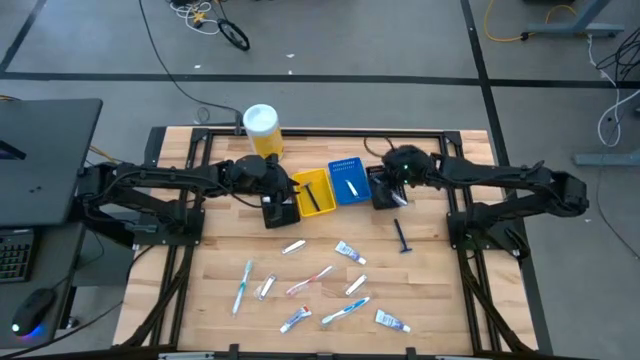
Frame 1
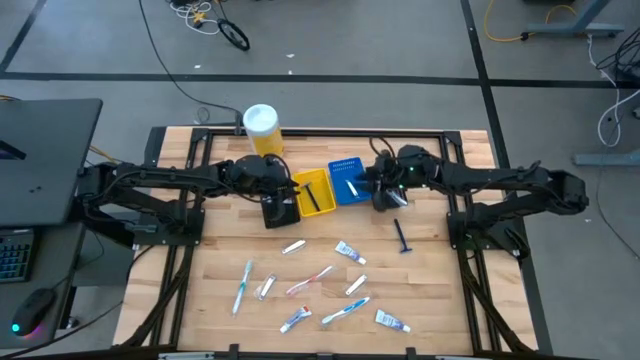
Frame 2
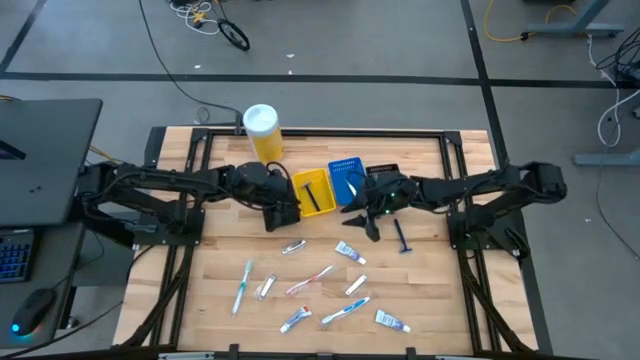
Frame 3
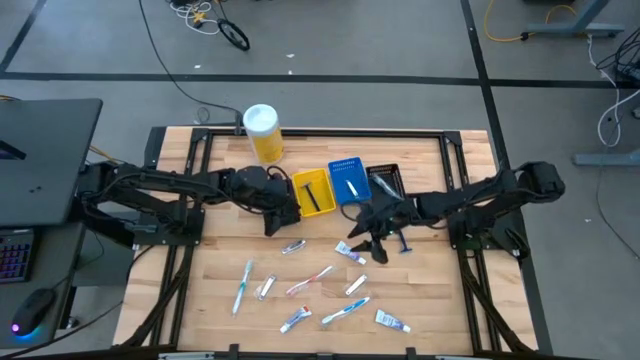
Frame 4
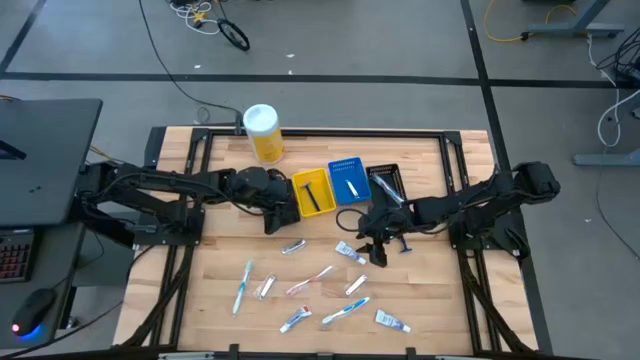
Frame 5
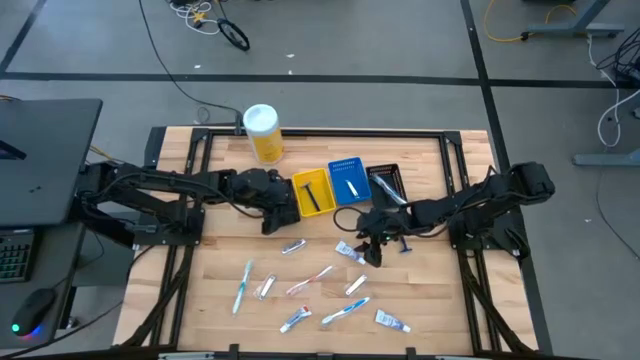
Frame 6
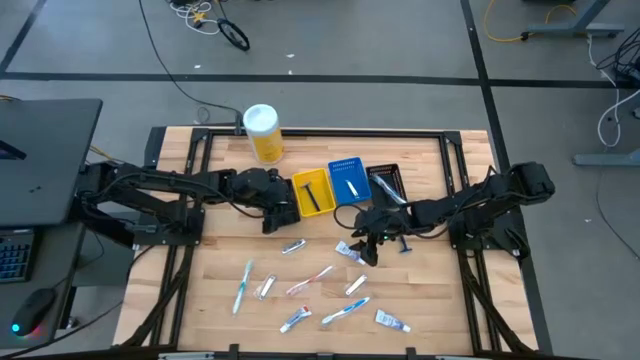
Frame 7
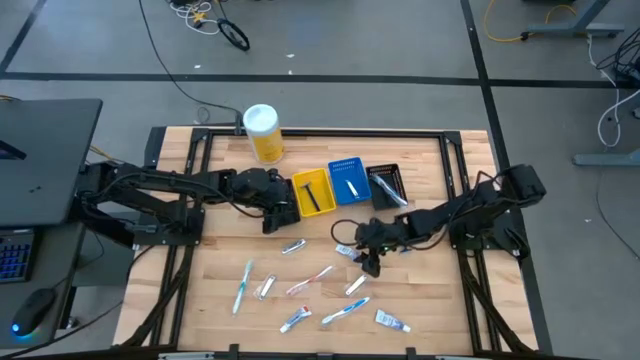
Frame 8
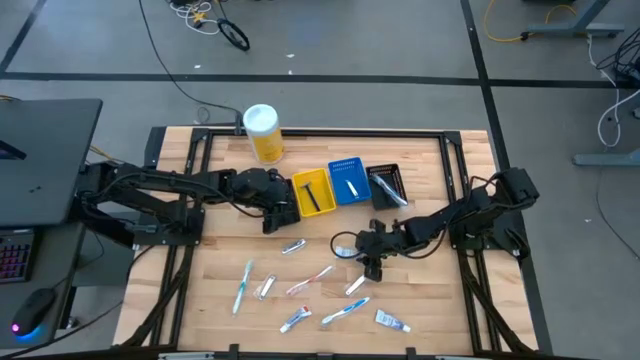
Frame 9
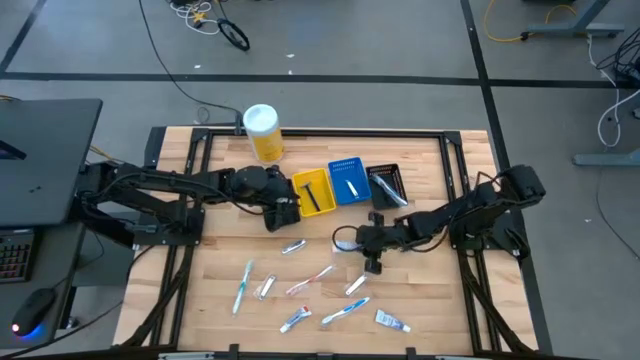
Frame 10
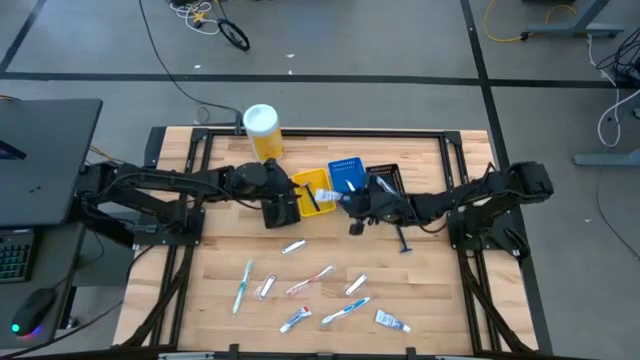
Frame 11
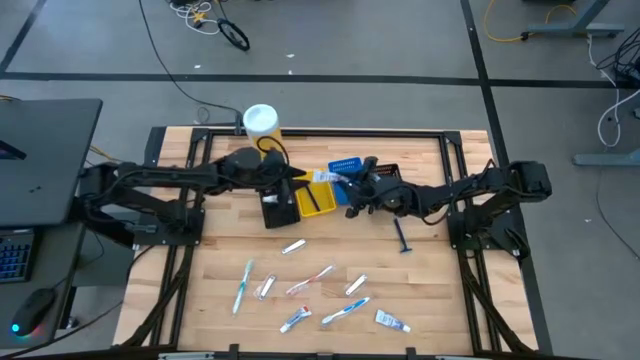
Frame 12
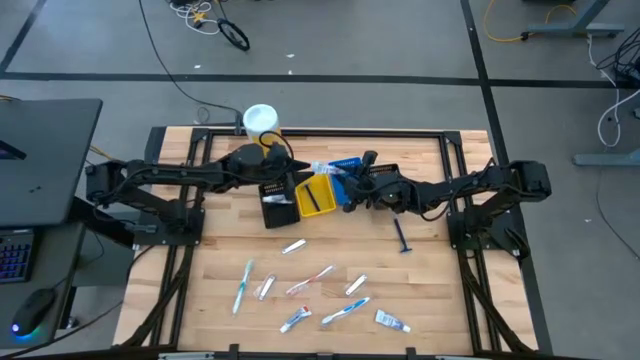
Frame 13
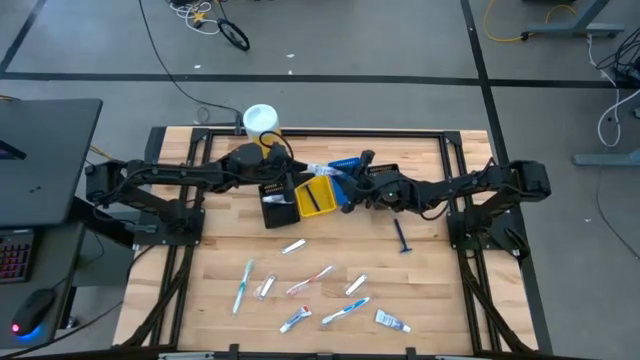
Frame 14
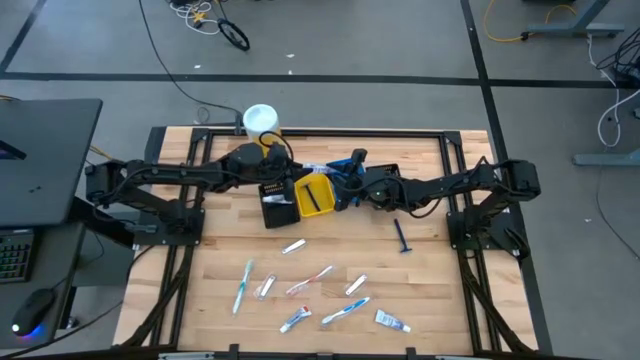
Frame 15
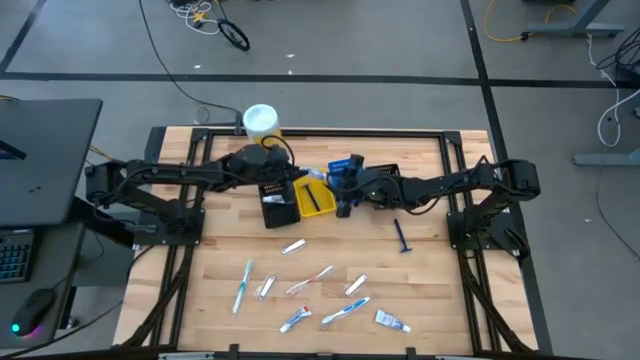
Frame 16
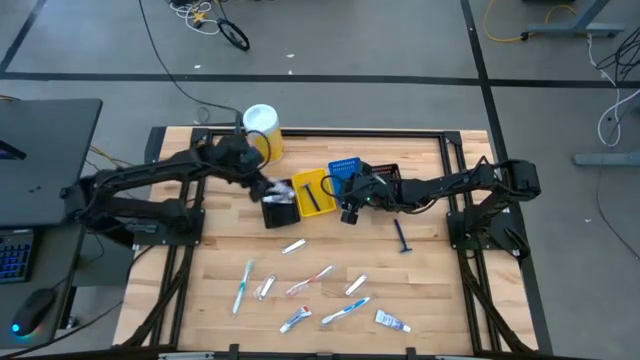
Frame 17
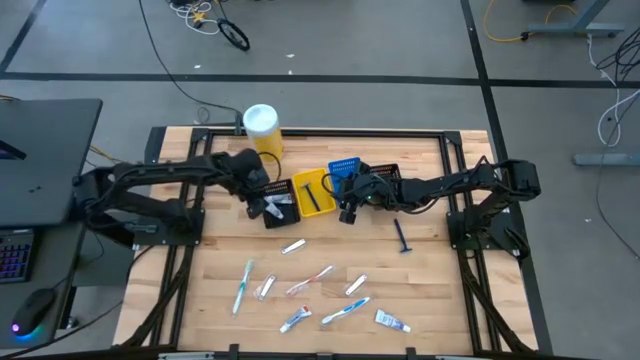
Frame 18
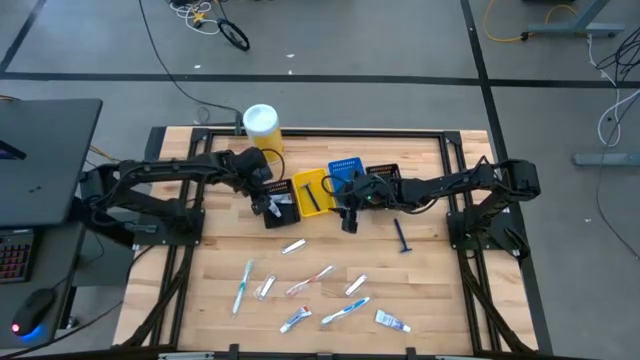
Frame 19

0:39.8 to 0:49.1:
Task: Pick & Place Travel size toiletries
Put the white toothpaste into the left black basket

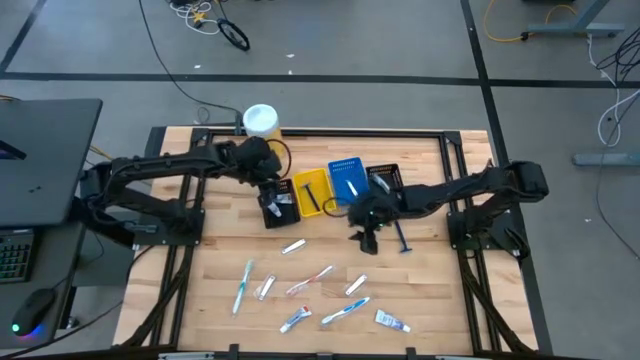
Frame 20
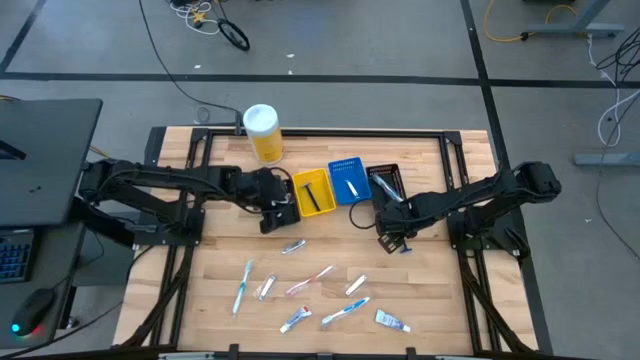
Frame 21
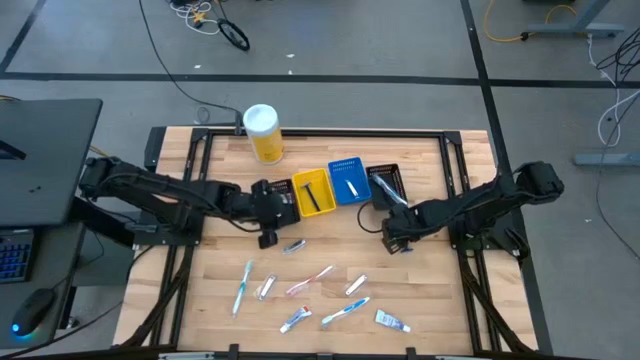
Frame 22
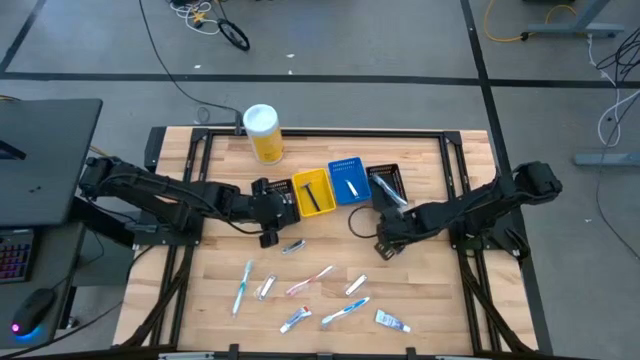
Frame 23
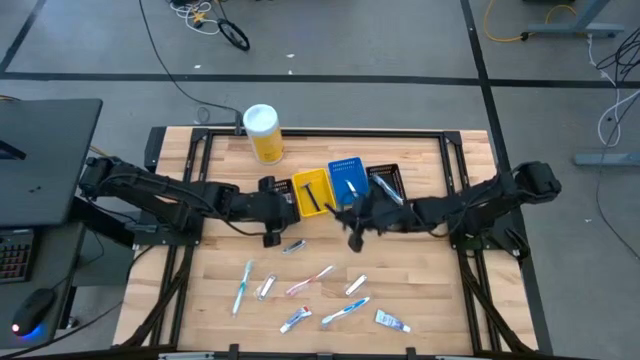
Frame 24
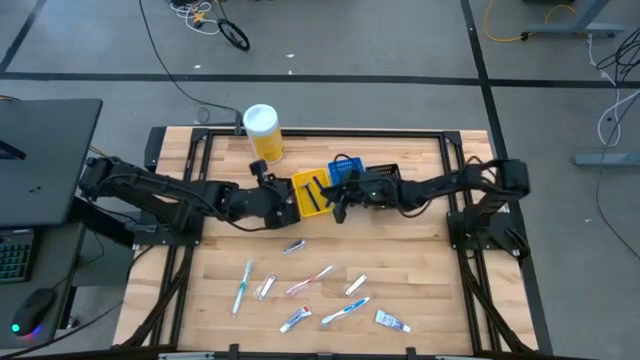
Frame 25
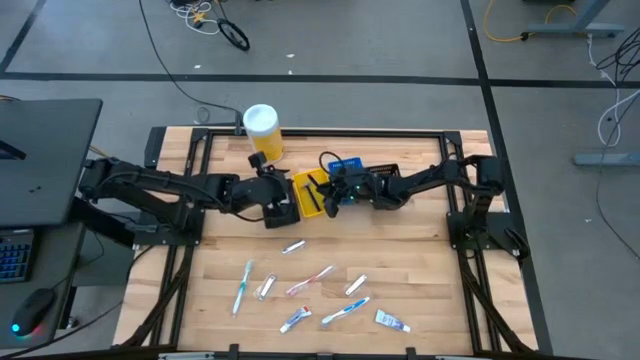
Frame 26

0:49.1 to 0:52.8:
Put the blue razor into the yellow basket

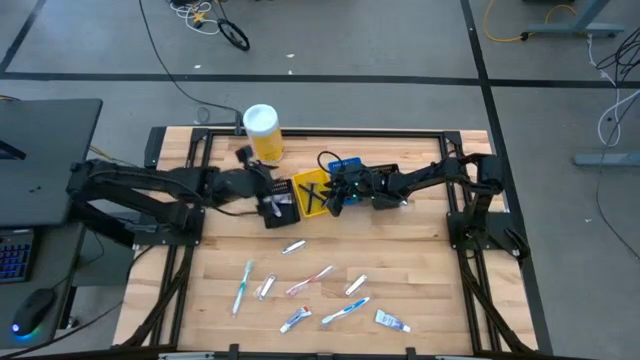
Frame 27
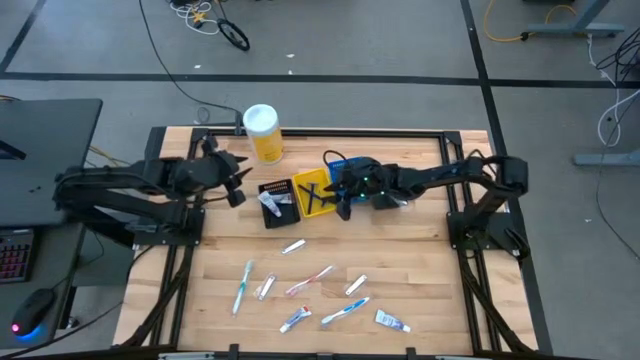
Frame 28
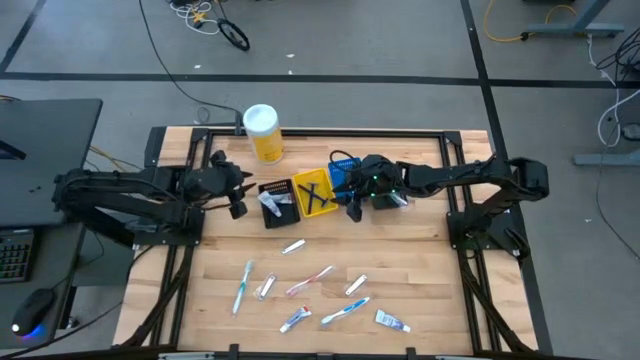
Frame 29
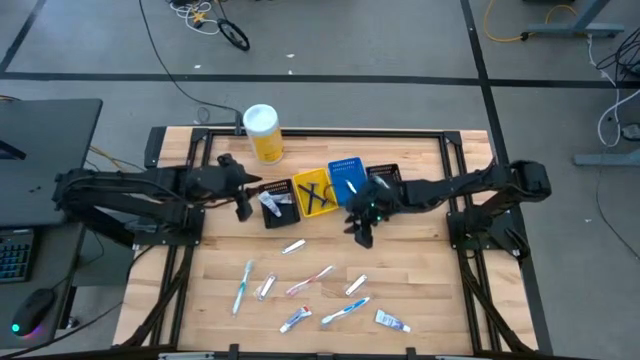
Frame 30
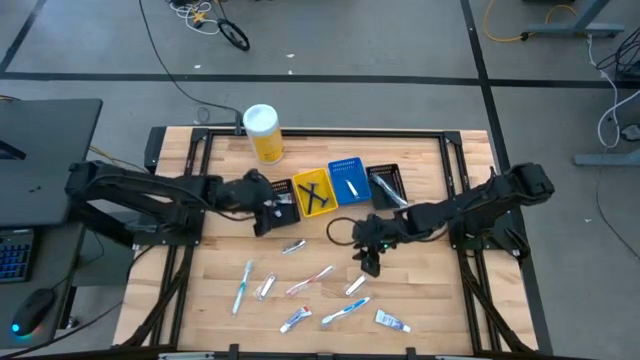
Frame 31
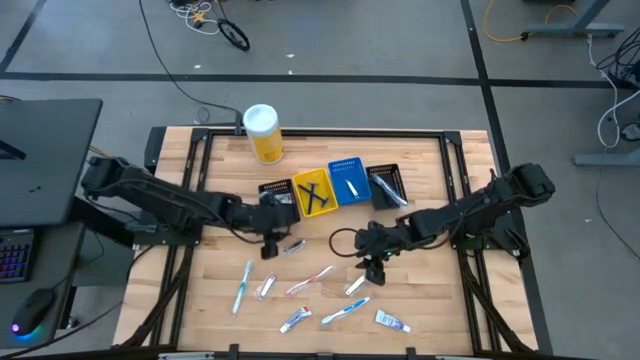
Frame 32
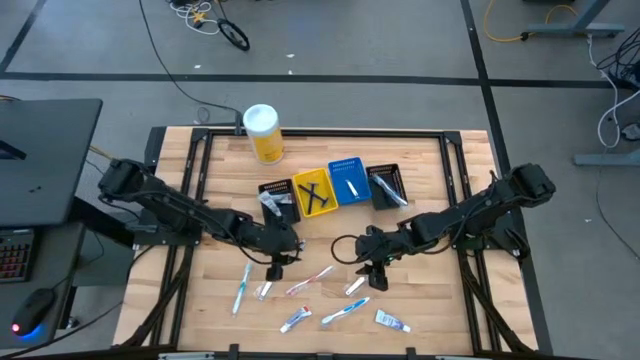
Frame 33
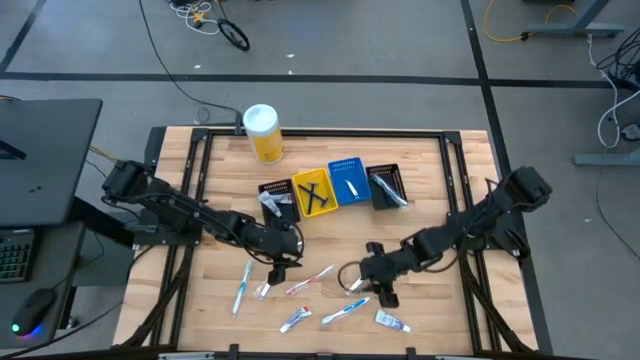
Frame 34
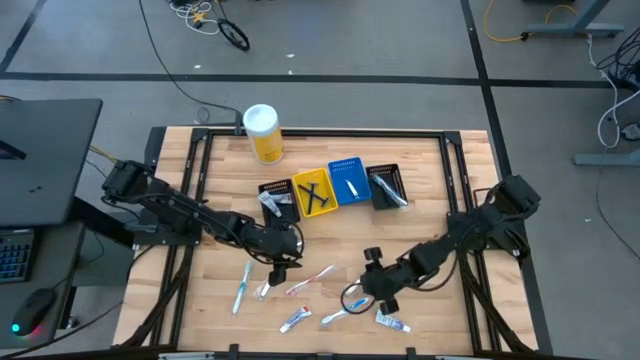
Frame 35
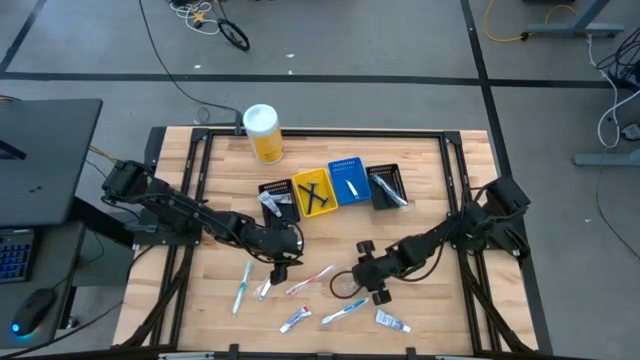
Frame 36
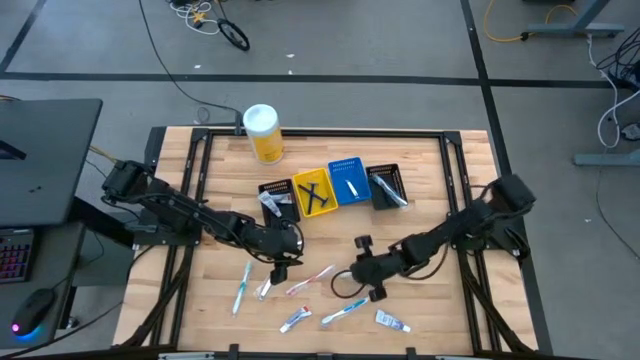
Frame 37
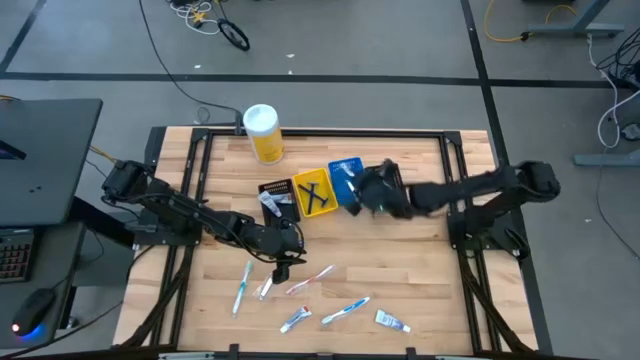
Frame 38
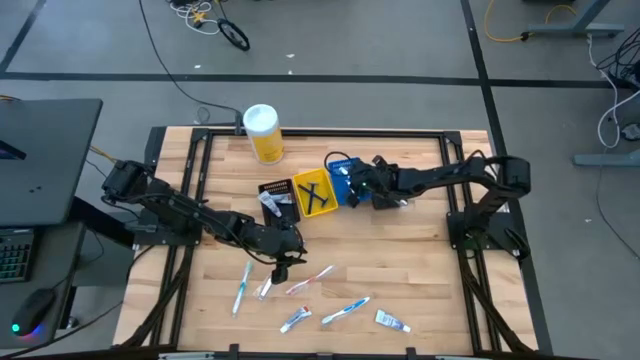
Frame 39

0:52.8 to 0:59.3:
Put the silver nail cutter into the blue basket

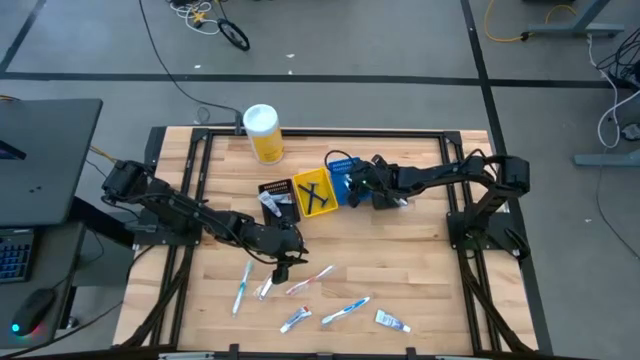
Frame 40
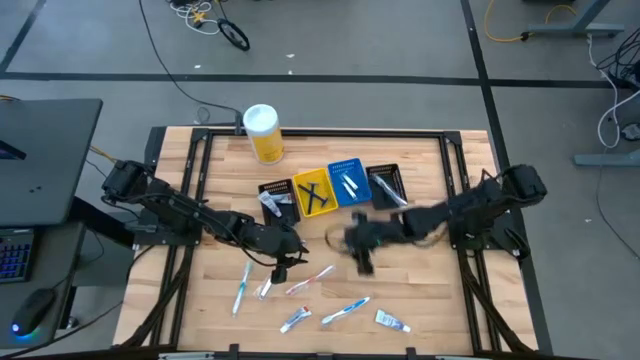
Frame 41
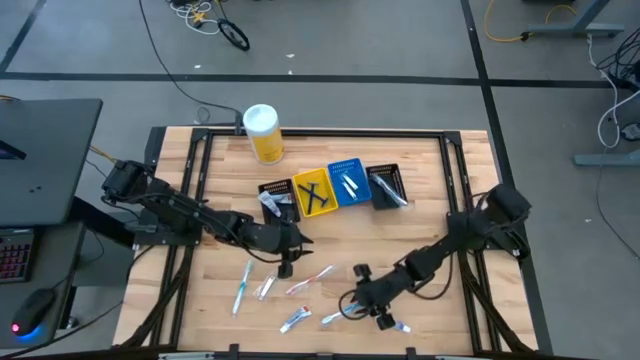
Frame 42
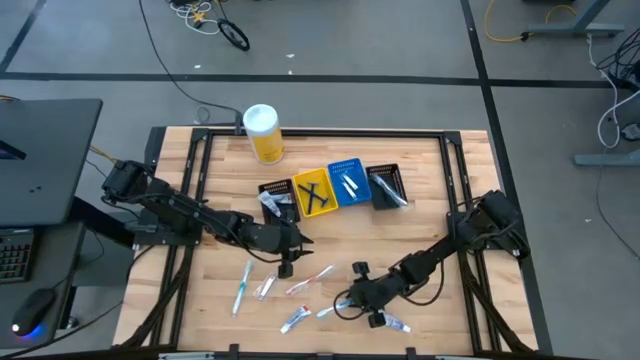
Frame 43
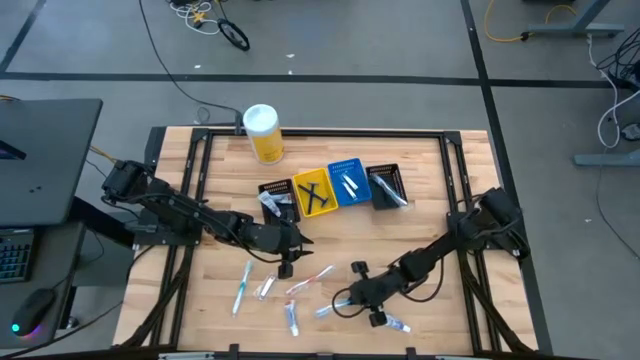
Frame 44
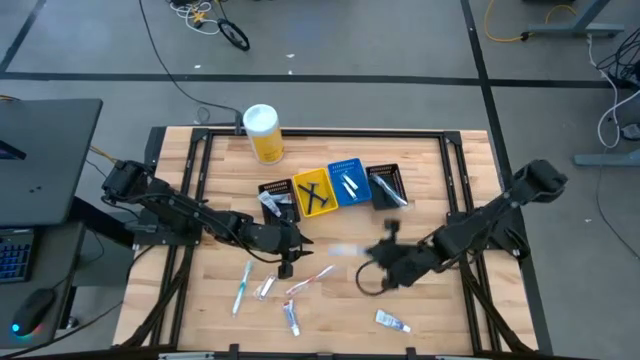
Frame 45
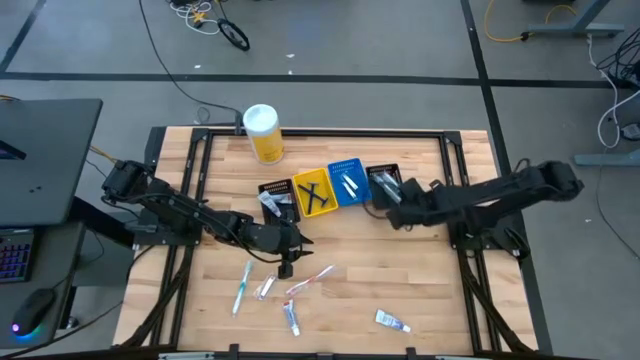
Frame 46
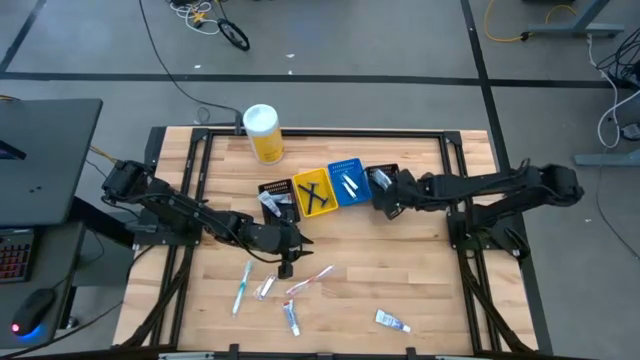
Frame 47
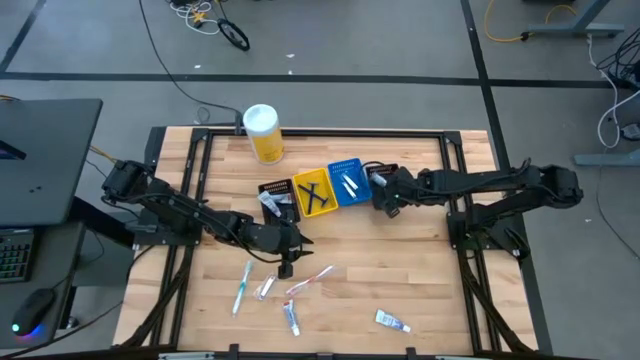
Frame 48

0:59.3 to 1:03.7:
Put the blue toothbrush into the right black basket
